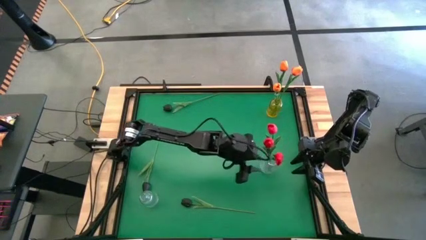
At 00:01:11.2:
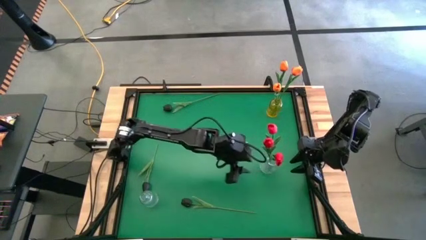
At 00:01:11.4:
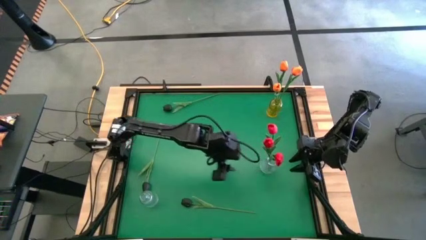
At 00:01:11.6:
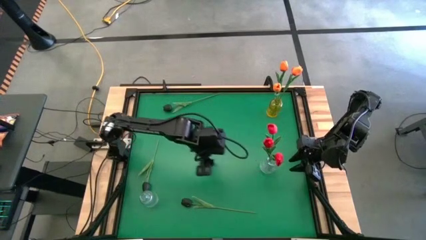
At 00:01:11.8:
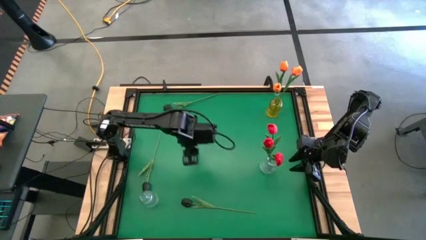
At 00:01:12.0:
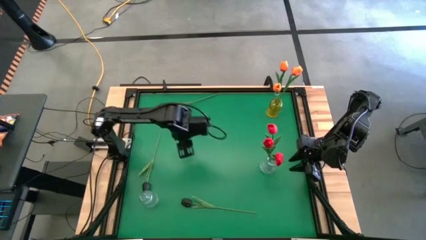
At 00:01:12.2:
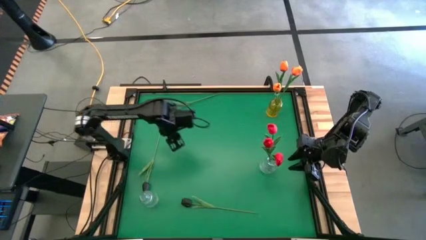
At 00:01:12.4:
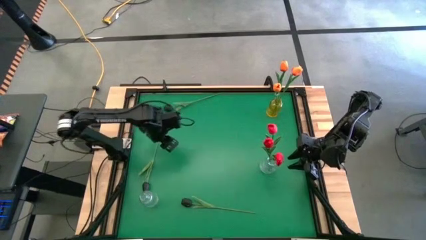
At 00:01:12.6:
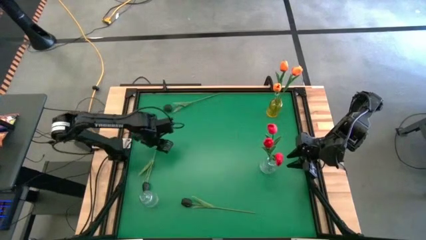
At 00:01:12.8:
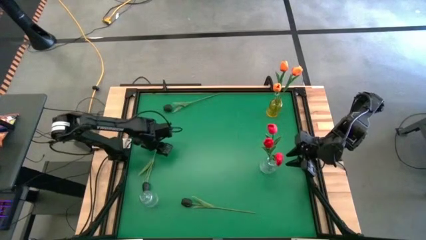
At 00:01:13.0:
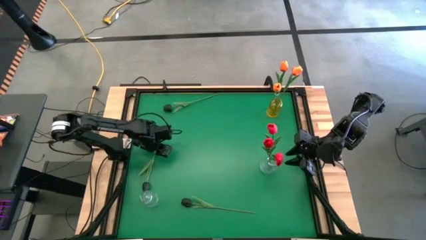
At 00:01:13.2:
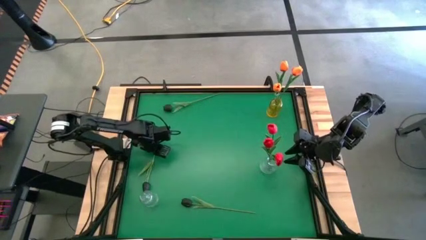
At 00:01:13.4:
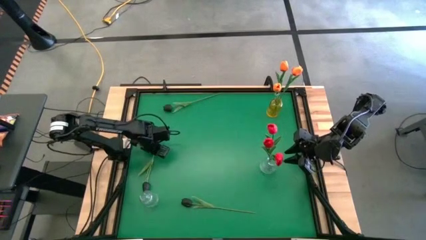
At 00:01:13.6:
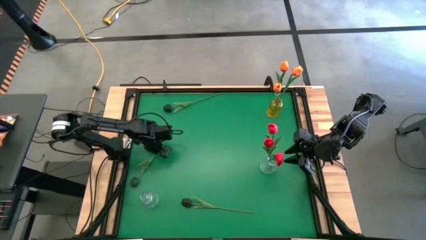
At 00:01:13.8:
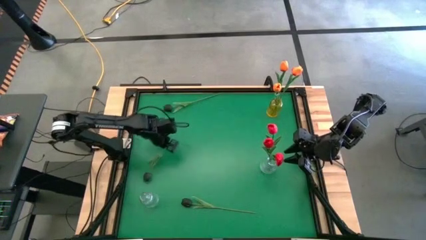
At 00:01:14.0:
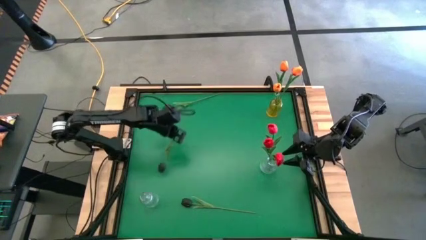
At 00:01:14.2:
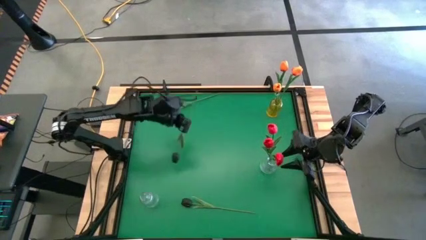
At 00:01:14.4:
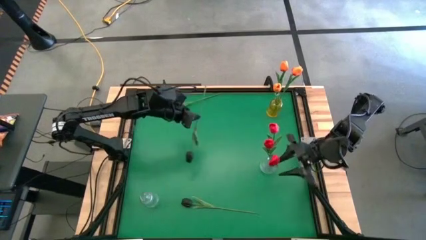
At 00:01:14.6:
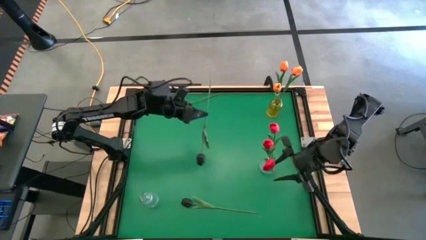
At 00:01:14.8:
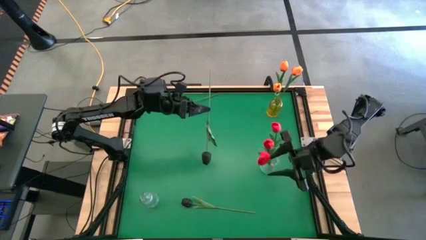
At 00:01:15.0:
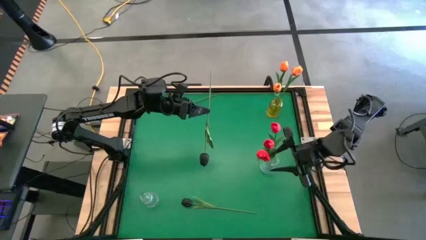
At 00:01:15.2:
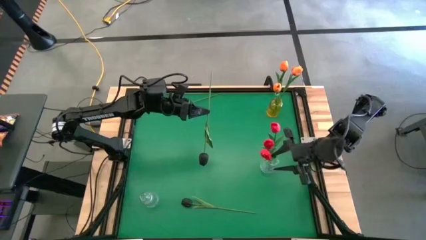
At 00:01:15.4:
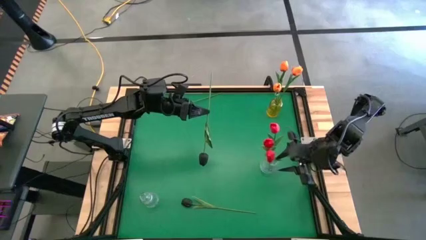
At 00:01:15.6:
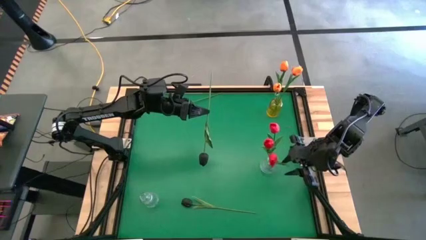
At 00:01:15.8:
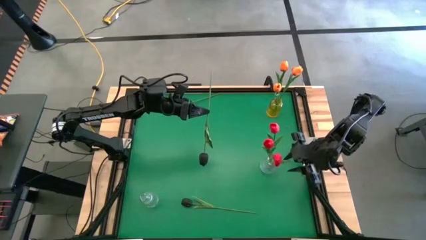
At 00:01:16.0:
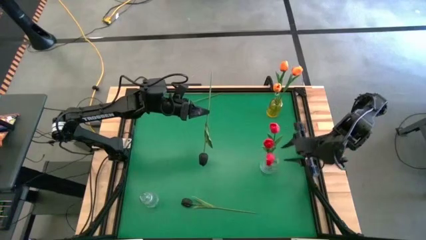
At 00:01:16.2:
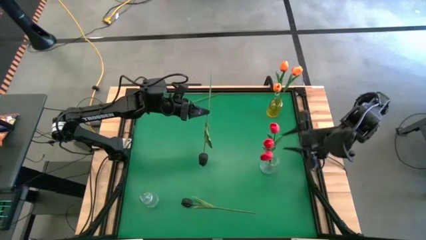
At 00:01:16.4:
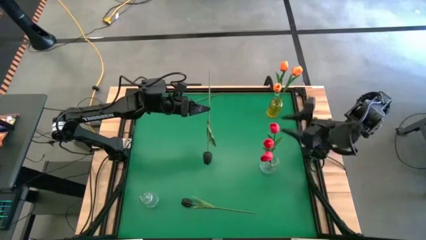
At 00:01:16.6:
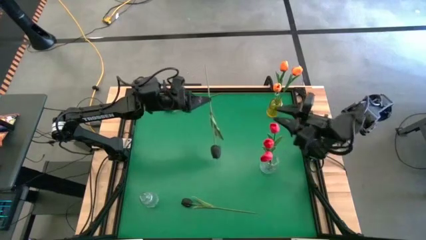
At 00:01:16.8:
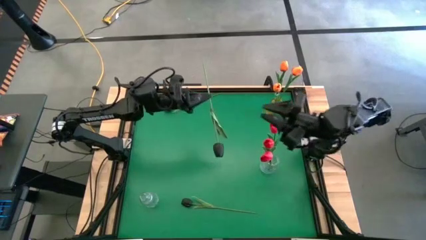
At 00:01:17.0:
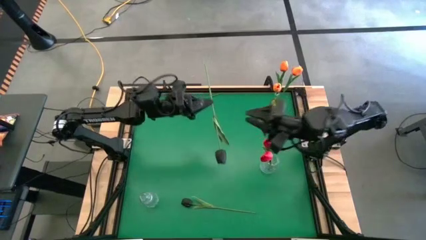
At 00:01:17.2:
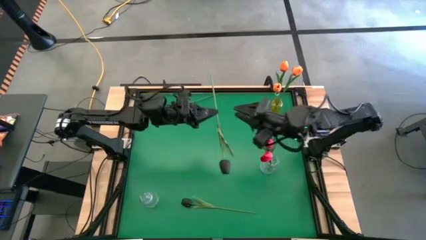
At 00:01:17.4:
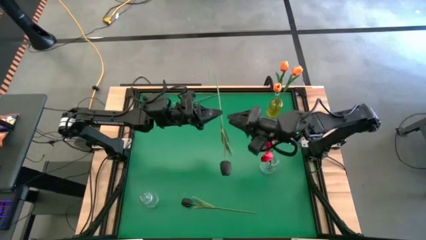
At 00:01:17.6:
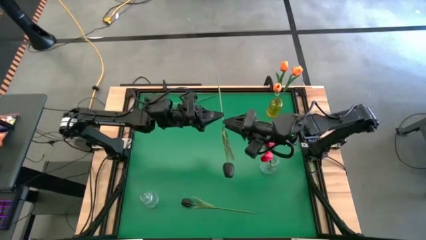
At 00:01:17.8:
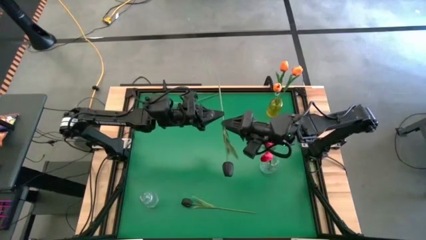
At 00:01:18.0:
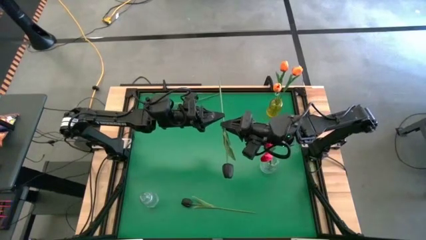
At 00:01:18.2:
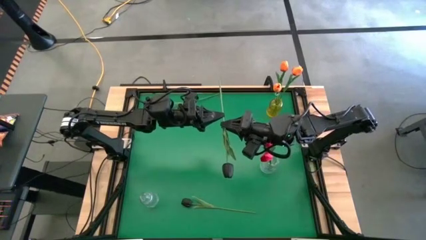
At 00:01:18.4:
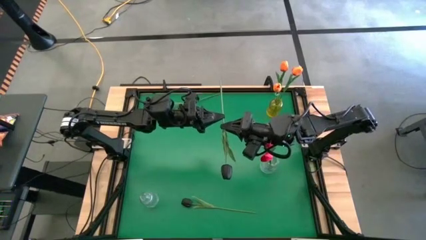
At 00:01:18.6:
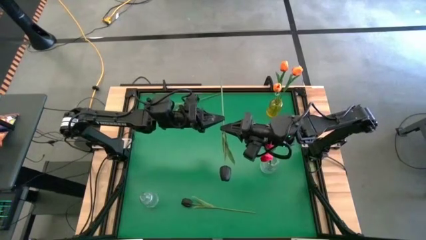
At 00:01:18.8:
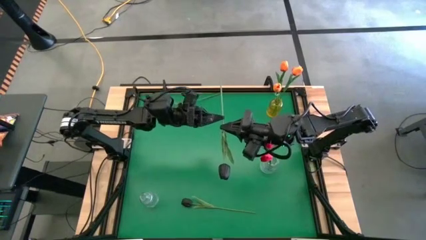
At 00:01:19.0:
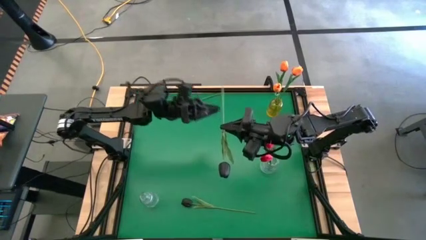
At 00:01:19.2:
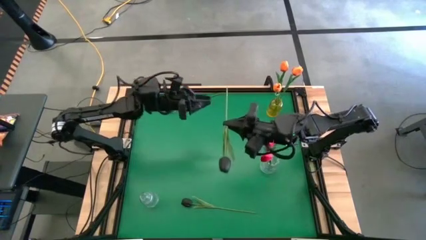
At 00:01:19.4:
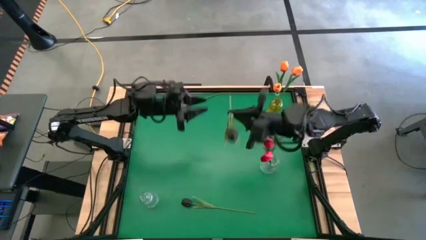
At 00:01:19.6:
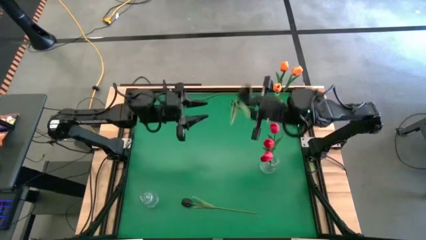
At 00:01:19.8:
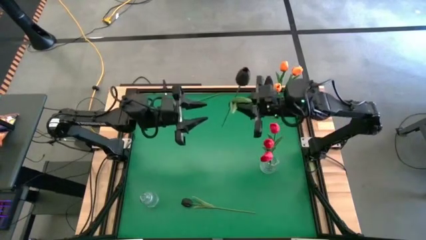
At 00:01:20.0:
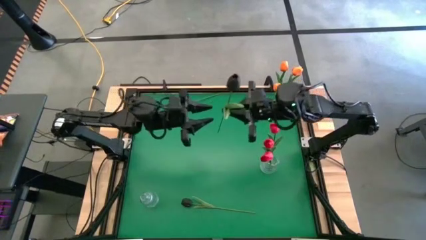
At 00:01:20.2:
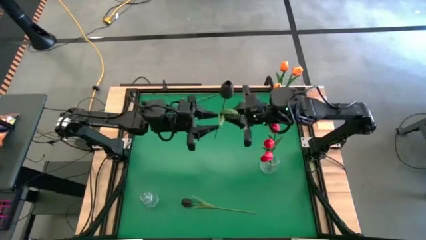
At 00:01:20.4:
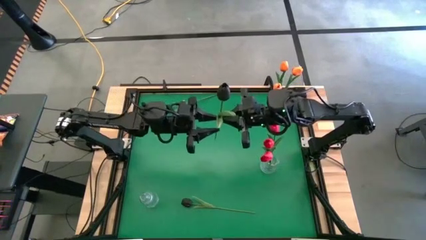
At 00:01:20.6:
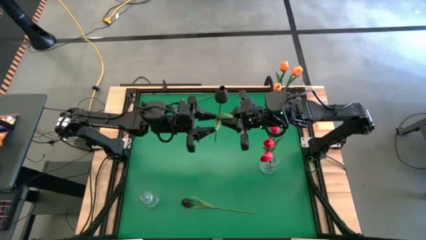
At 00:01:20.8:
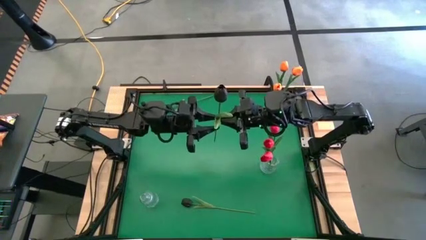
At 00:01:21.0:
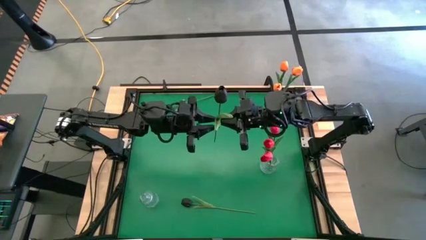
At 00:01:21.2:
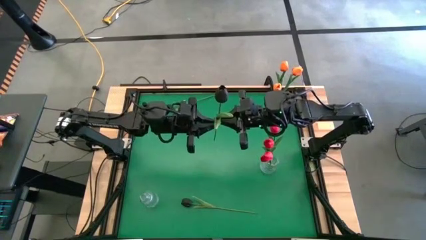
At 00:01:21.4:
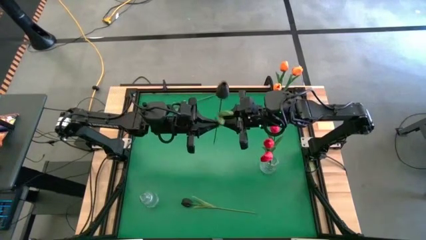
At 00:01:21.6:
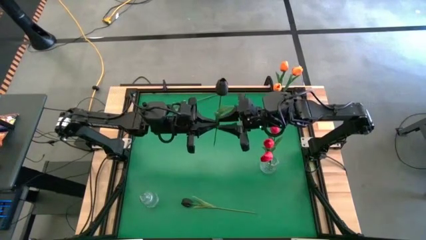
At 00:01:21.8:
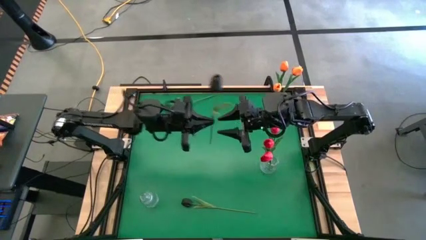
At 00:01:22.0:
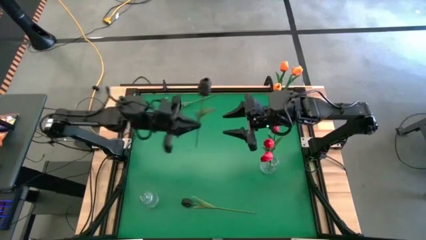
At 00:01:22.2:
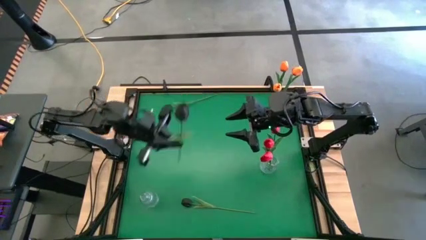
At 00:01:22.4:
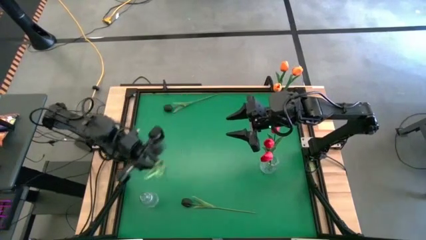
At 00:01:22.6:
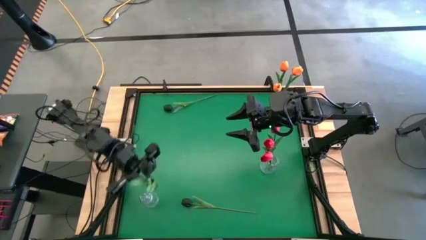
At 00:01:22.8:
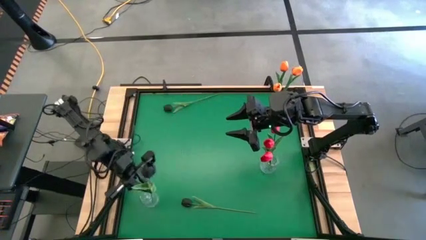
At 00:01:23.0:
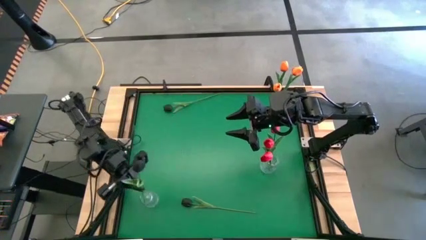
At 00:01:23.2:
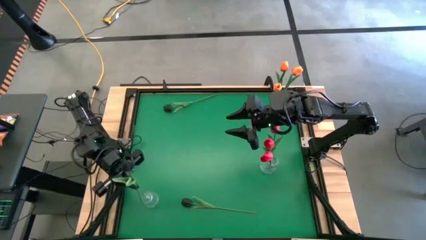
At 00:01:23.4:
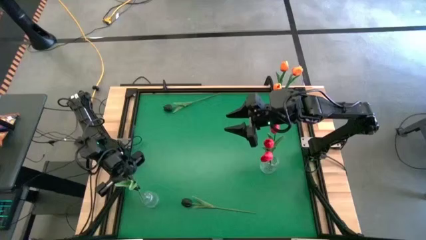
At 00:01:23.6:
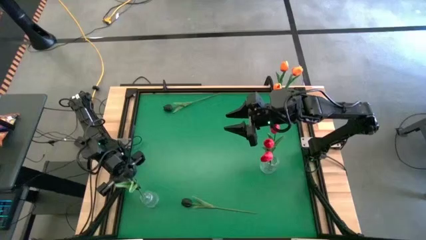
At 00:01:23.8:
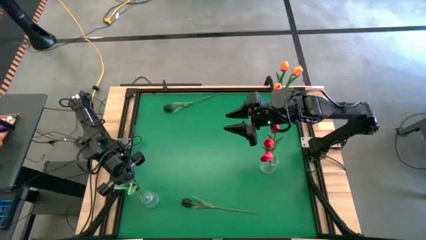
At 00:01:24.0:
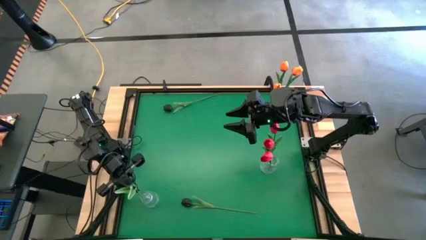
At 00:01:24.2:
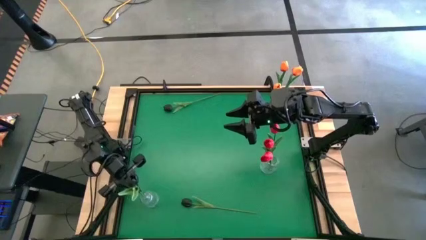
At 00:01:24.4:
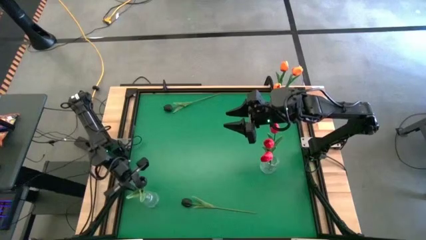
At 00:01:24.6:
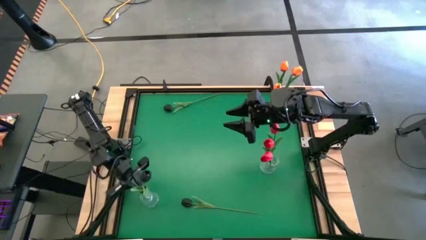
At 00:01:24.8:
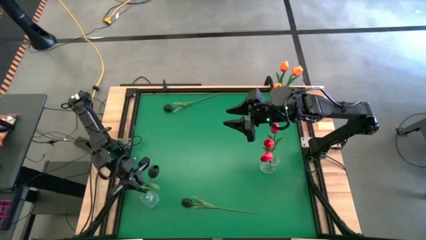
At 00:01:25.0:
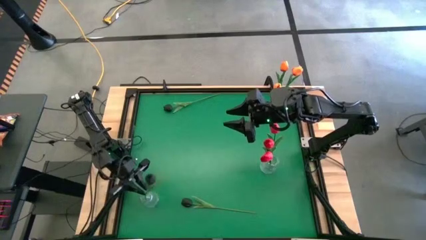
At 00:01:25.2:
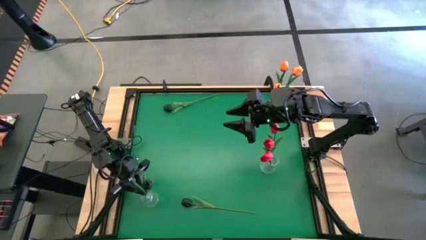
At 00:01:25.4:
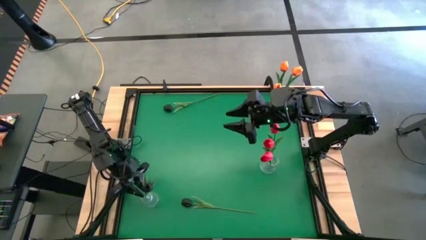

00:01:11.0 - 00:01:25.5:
Task: Sort flowers into vase by color
Put the middle black tulip into the bottom transparent flower vase
